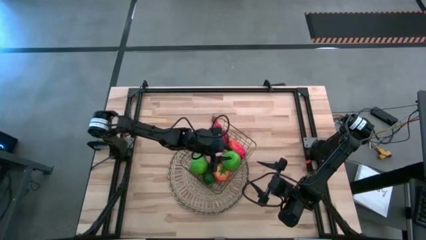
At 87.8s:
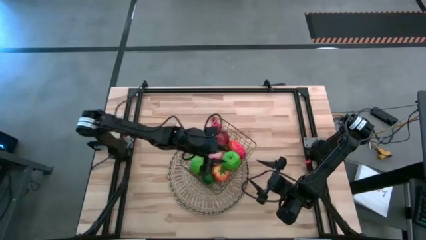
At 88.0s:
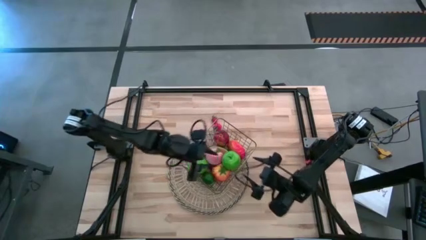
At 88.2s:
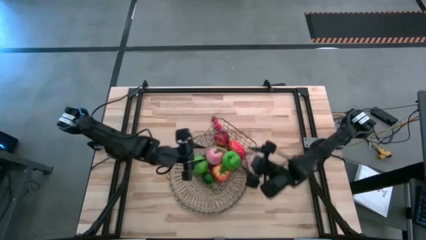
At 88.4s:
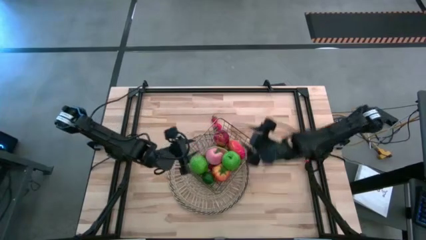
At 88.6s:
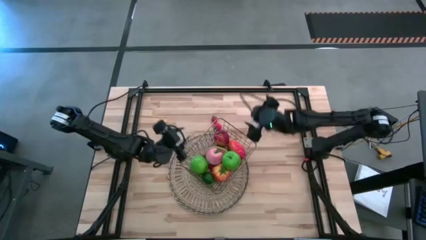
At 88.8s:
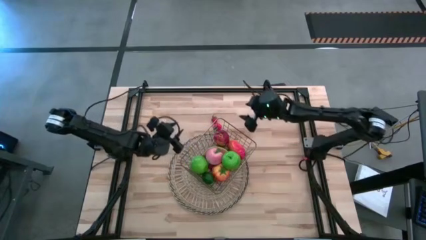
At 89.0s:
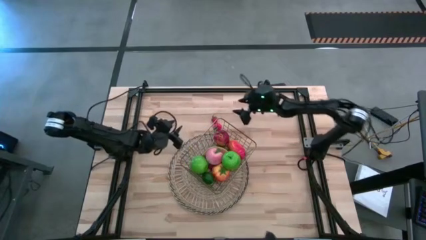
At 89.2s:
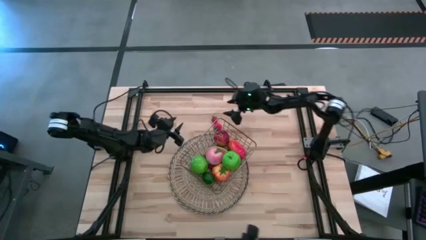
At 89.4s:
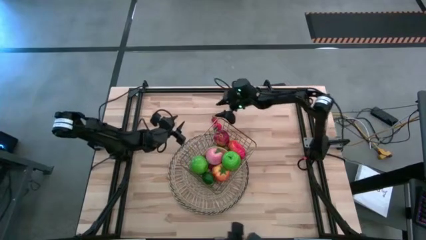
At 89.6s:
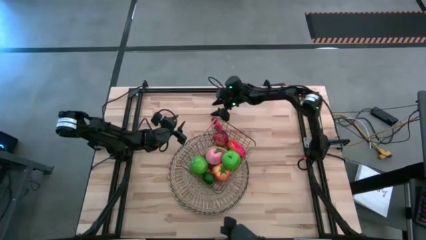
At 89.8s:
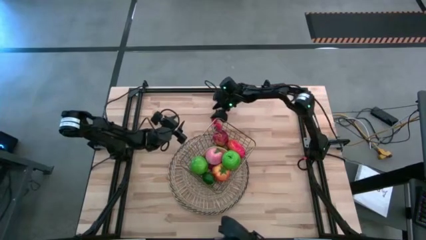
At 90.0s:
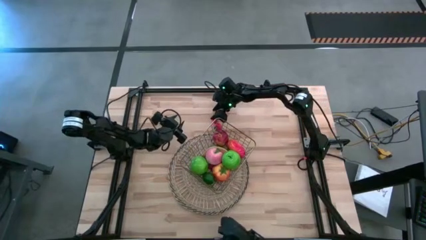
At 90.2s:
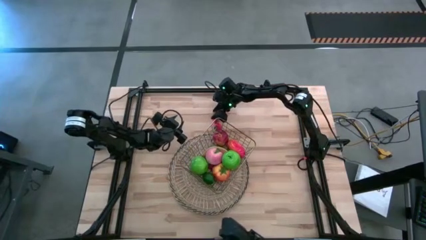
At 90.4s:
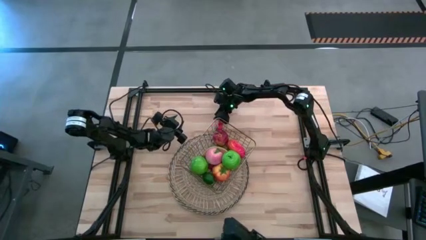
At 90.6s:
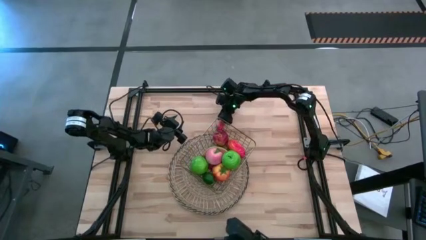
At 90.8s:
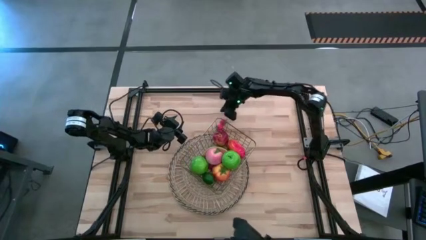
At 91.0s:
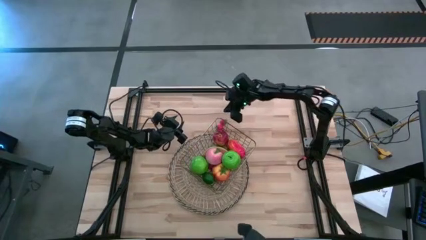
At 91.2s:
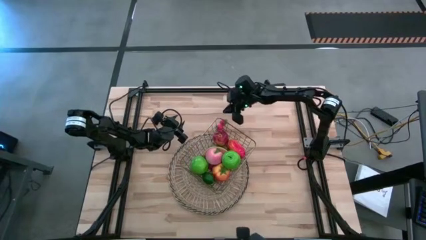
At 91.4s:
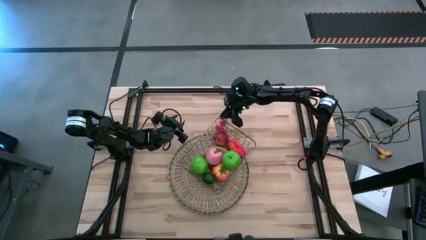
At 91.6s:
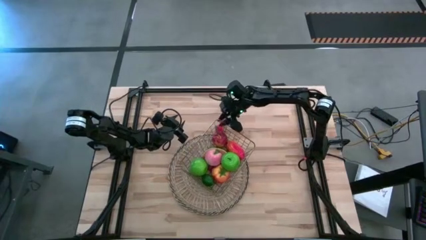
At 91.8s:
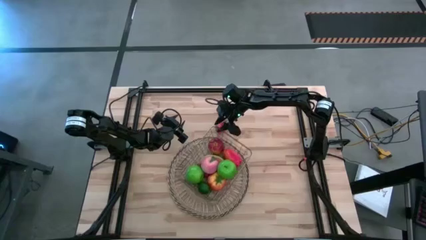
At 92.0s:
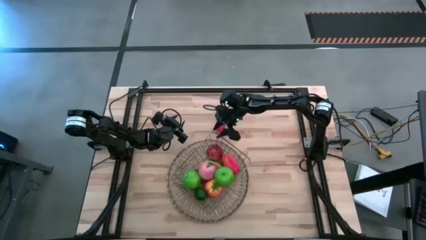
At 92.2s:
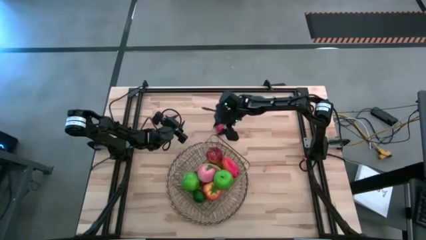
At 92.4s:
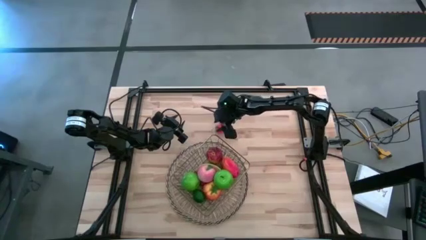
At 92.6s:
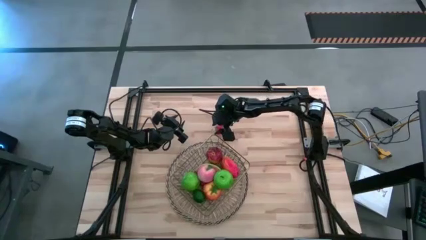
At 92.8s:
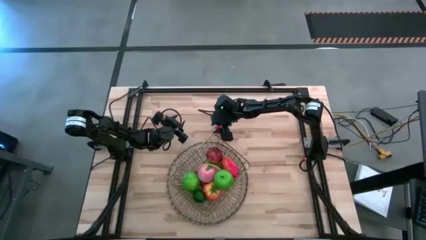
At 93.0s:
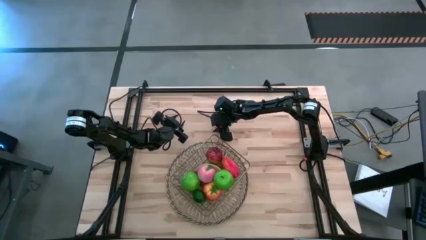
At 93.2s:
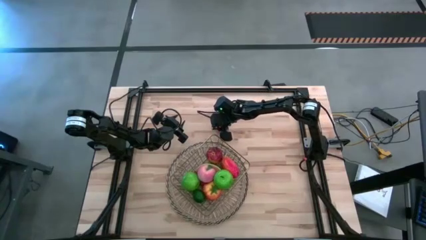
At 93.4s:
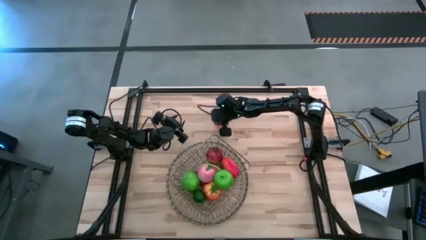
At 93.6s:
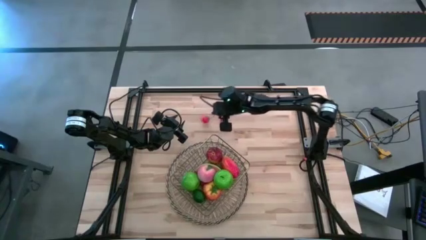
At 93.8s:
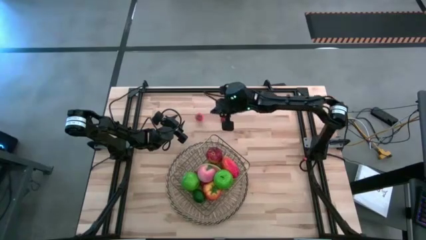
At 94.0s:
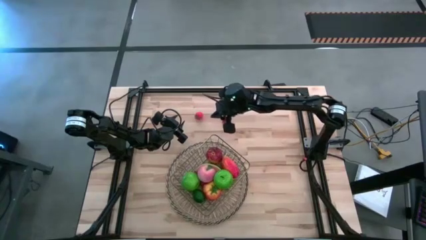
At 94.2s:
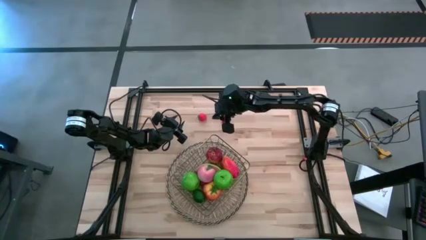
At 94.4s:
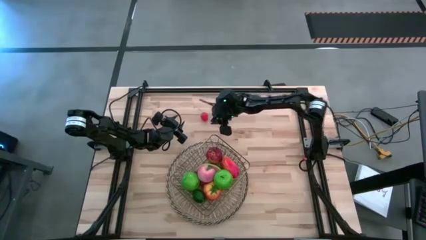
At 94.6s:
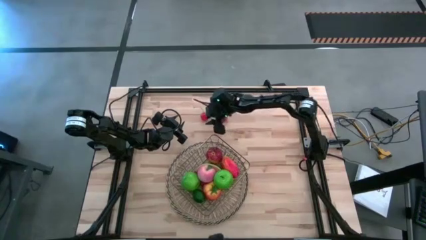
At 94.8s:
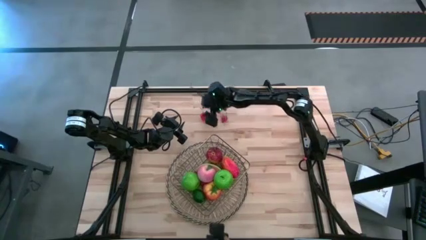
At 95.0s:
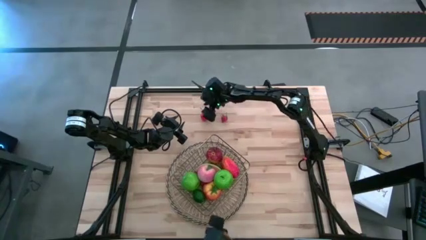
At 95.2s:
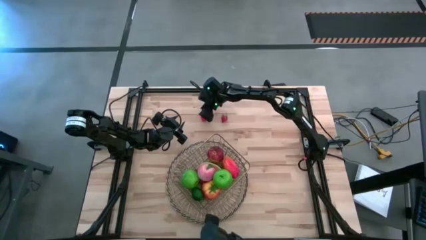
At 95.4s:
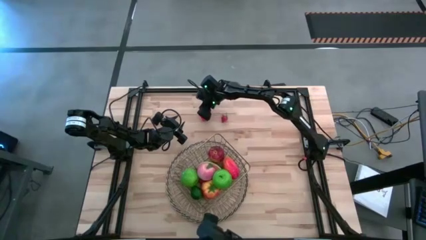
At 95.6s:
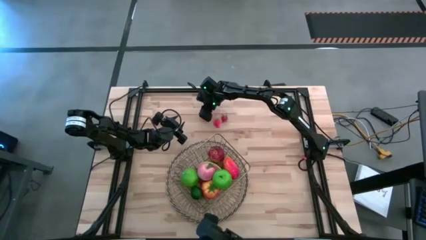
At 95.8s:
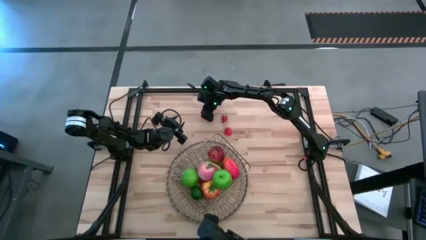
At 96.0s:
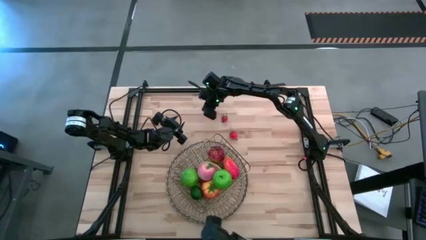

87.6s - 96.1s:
Task: Build produce basket
Put the bottom strawberry into the gold wire basket

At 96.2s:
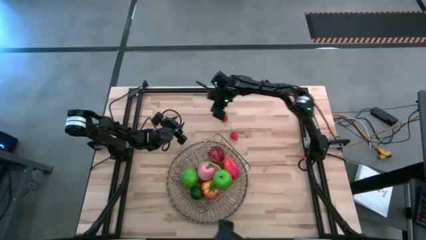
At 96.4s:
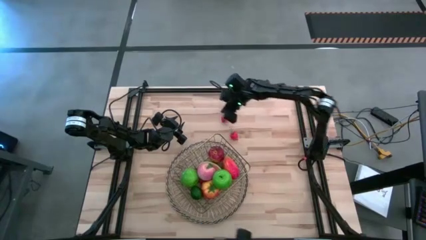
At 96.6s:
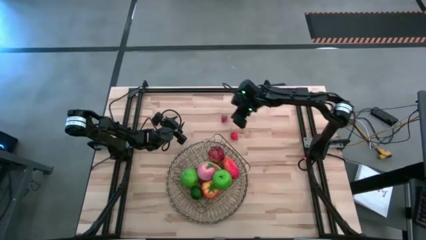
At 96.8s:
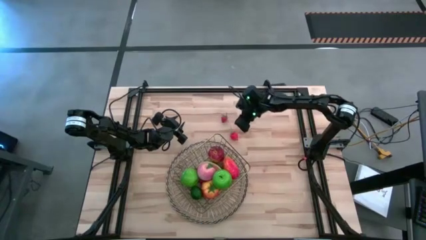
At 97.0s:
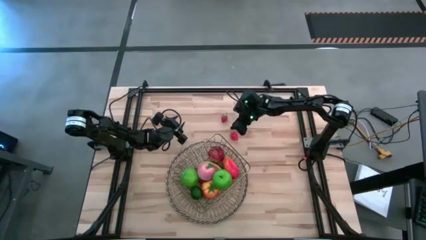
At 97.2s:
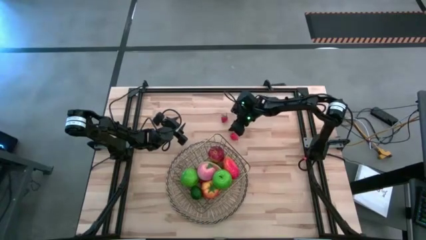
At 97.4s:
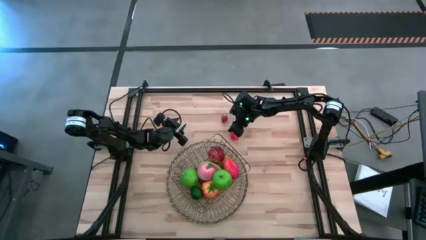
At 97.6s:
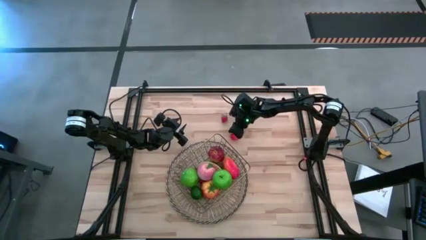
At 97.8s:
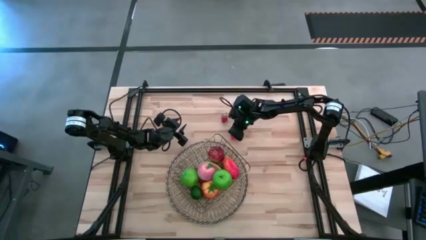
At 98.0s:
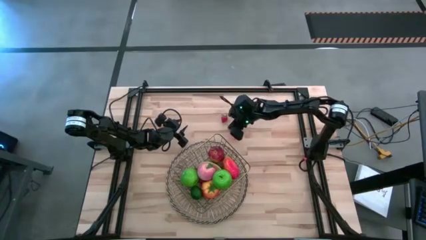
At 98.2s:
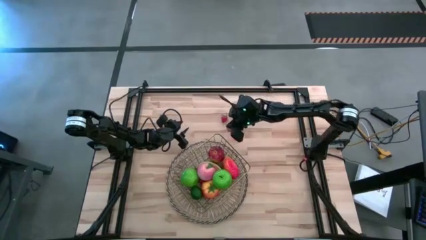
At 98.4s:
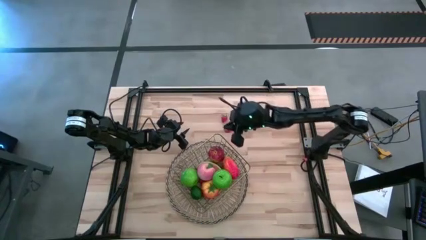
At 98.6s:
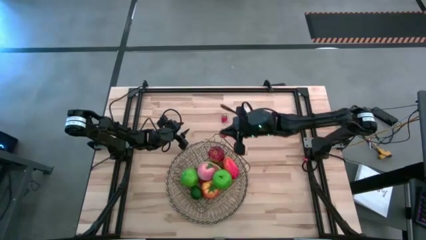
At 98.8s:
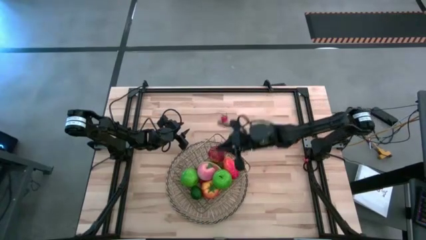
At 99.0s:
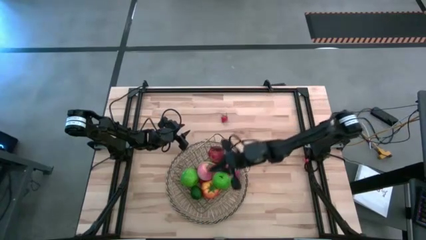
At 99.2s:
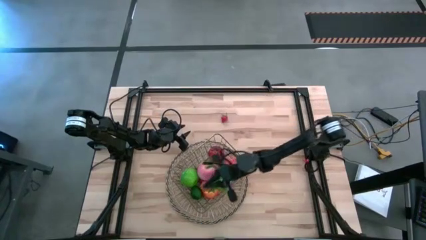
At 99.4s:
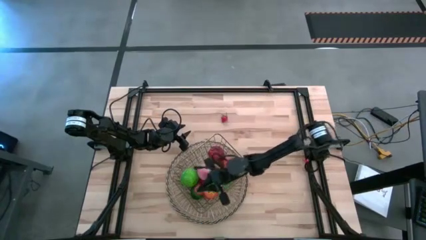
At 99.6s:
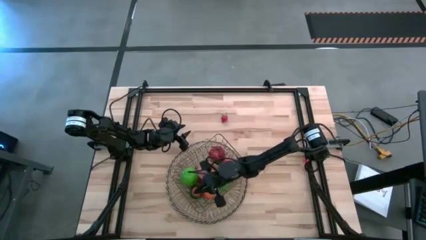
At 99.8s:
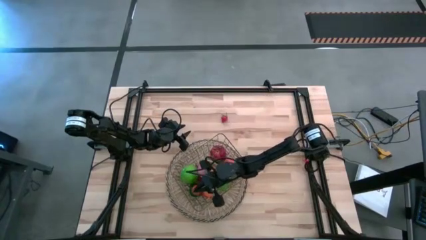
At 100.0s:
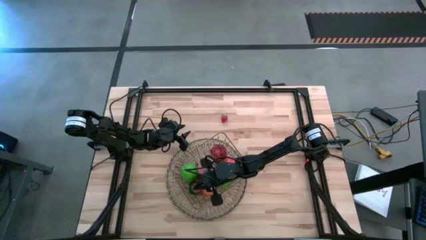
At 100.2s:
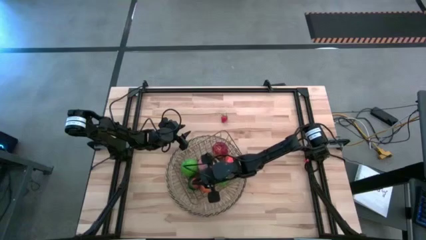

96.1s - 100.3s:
Put the bottom strawberry into the gold wire basket

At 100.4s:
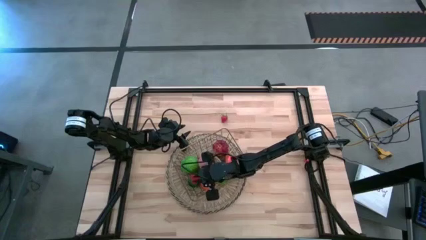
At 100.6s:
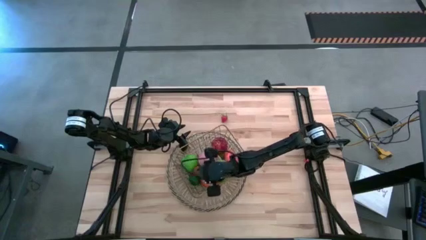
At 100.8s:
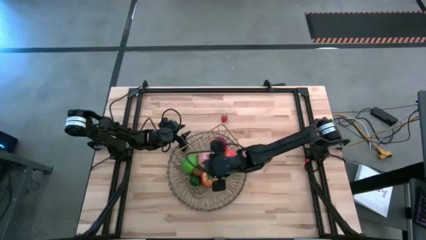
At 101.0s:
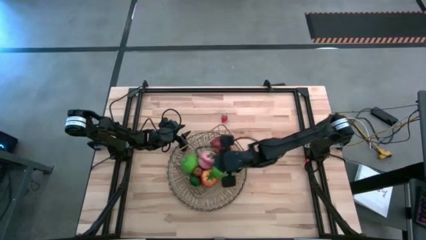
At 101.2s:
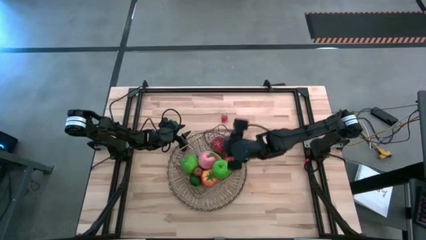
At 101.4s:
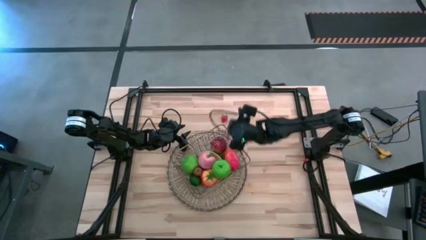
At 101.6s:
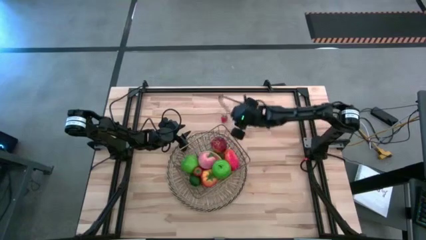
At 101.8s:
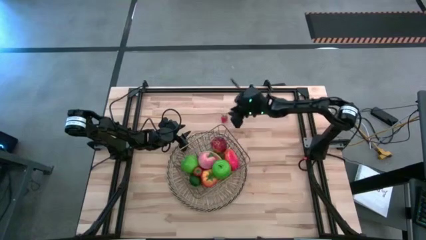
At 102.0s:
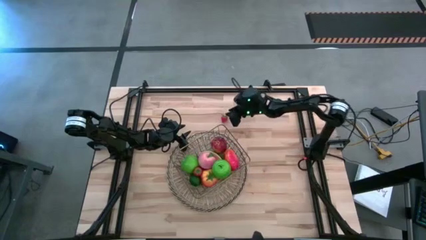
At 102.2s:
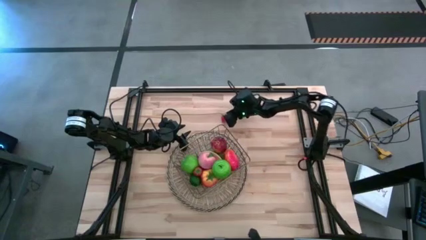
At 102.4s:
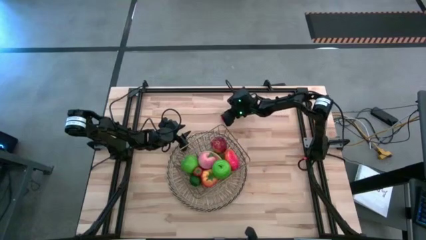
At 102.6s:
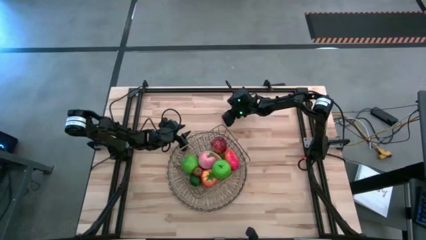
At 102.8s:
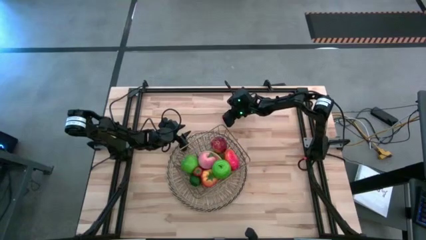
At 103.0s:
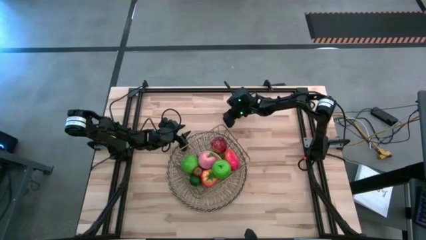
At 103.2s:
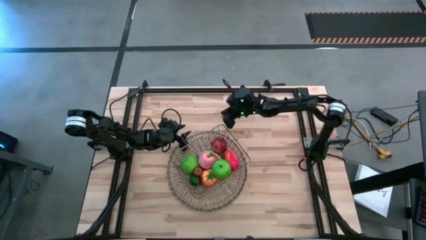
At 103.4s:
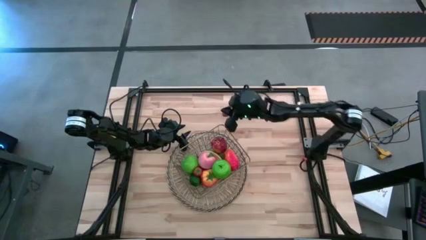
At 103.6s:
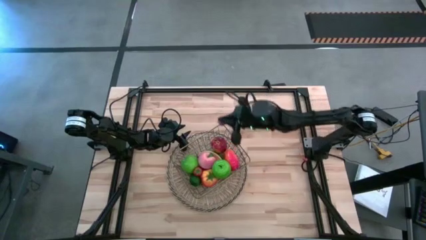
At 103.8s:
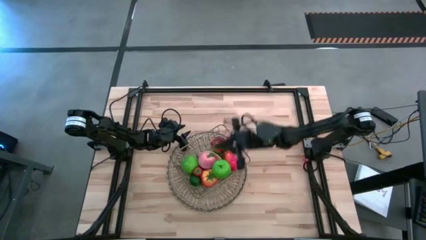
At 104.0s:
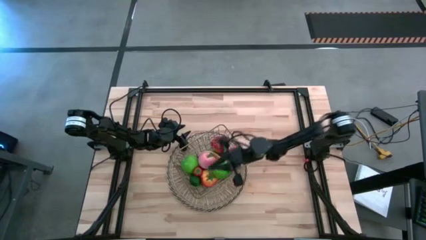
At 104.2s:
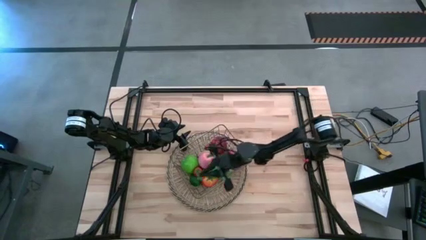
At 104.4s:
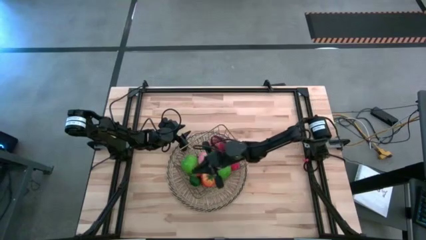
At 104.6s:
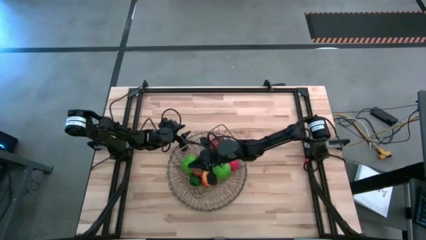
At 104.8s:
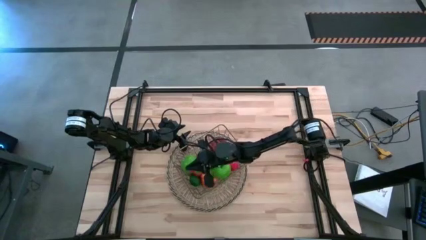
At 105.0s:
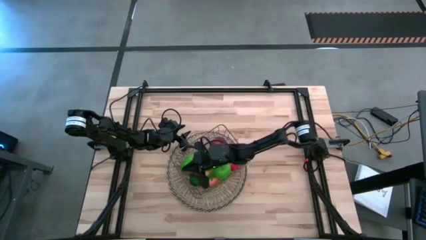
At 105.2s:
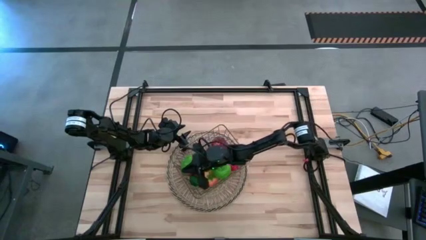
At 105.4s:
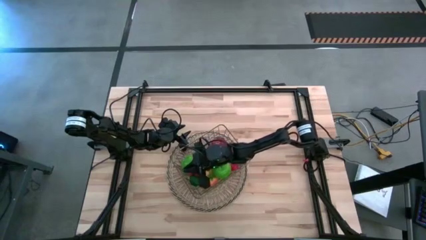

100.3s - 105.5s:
Put the strawberry into the gold wire basket
